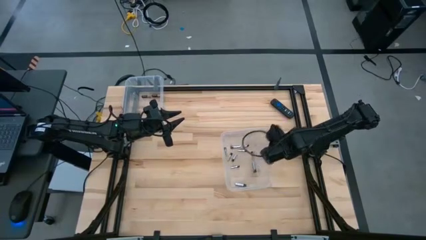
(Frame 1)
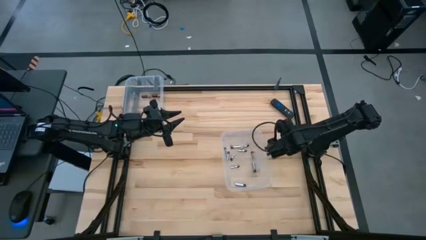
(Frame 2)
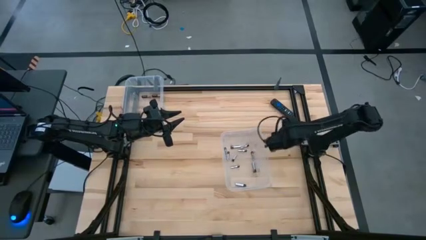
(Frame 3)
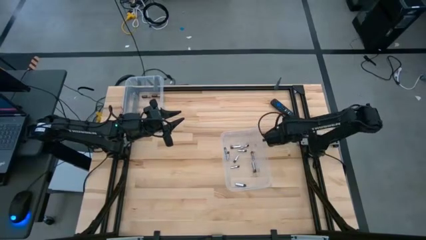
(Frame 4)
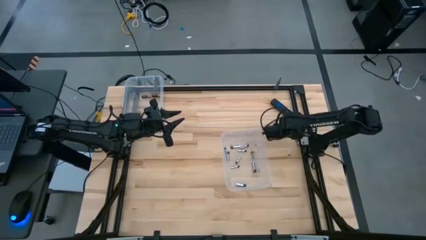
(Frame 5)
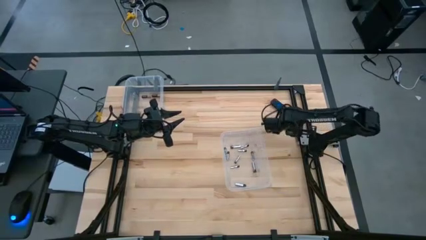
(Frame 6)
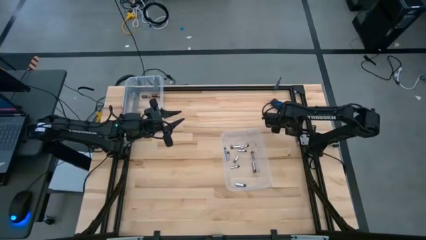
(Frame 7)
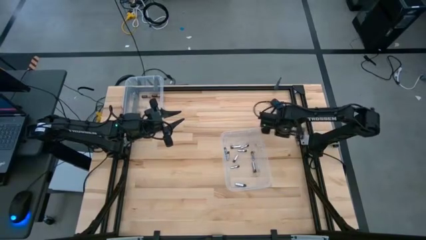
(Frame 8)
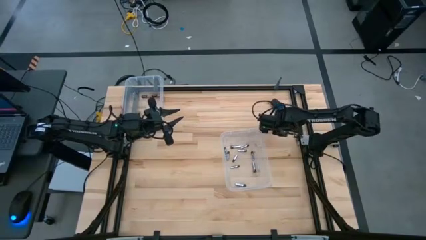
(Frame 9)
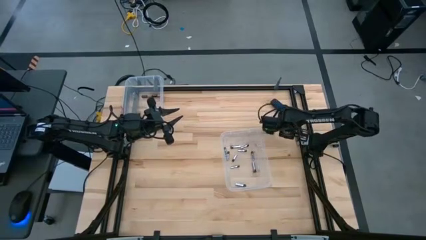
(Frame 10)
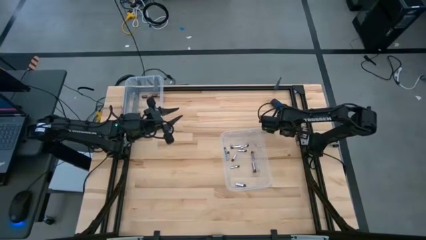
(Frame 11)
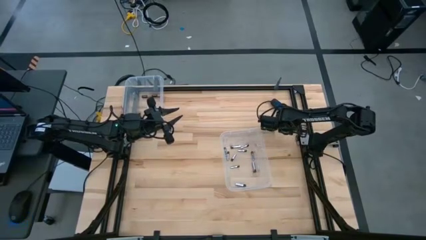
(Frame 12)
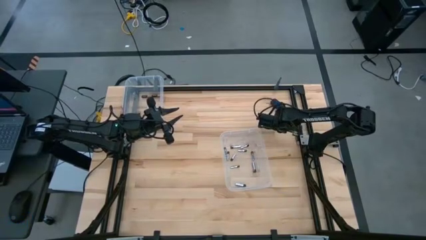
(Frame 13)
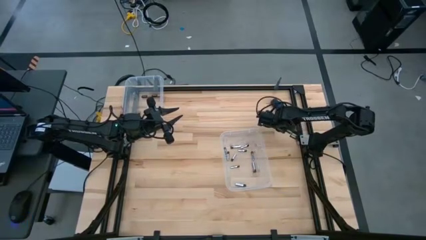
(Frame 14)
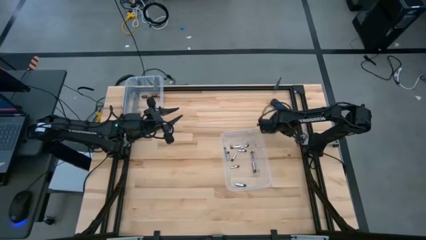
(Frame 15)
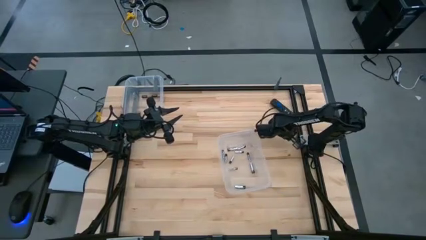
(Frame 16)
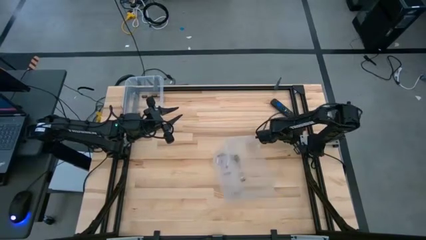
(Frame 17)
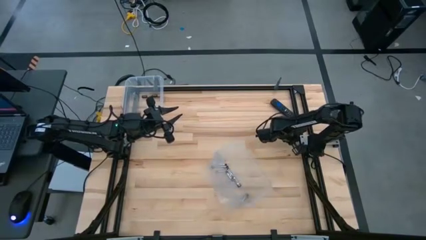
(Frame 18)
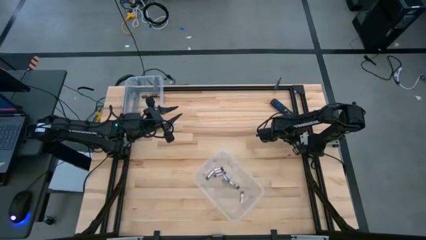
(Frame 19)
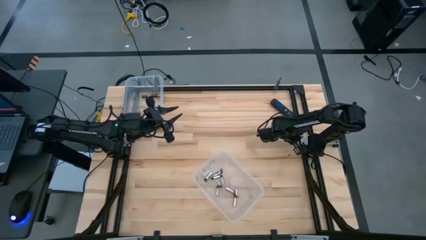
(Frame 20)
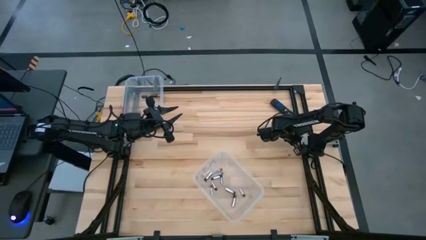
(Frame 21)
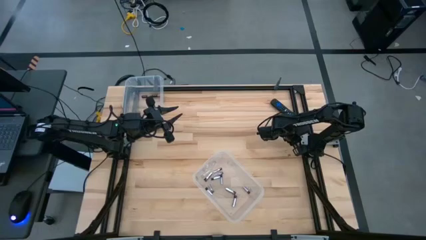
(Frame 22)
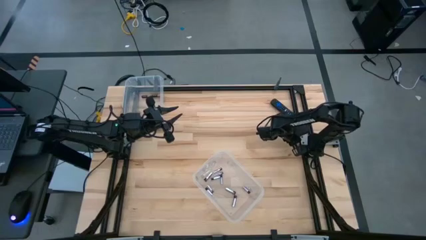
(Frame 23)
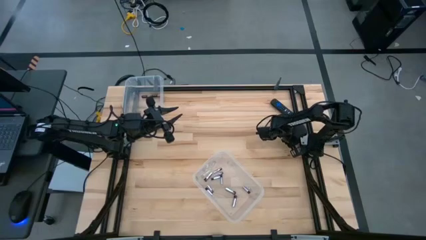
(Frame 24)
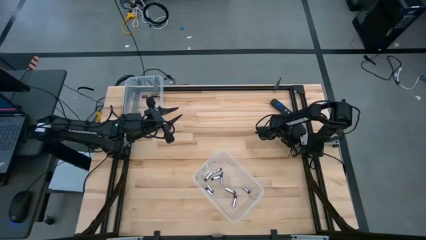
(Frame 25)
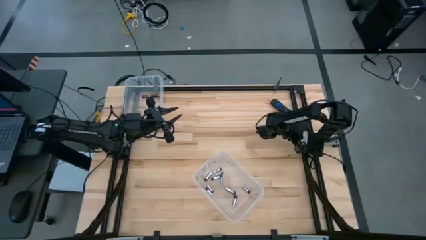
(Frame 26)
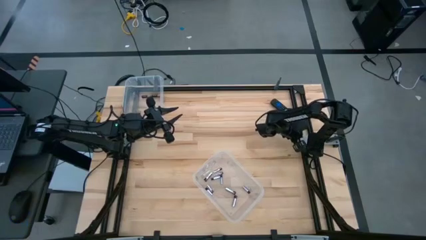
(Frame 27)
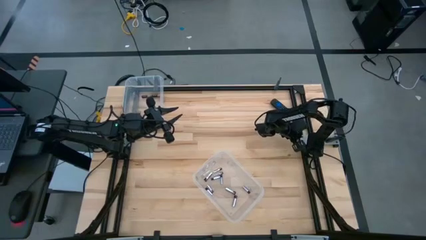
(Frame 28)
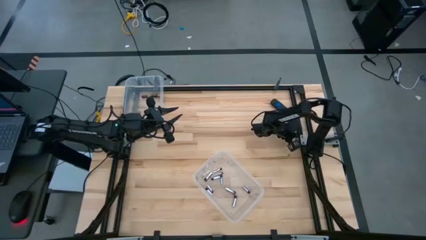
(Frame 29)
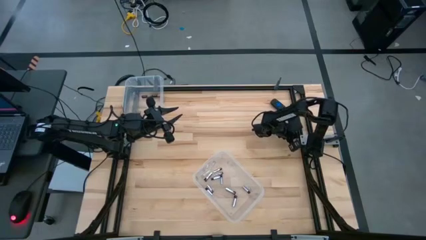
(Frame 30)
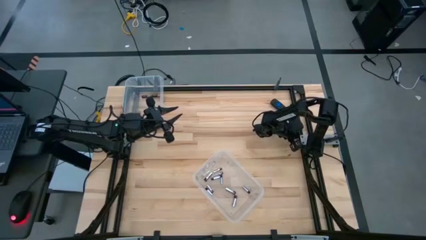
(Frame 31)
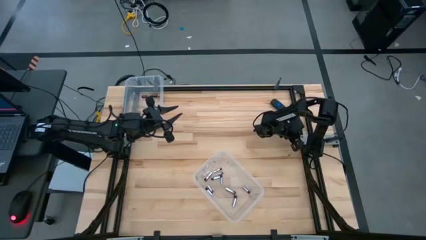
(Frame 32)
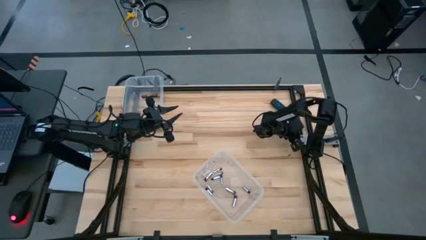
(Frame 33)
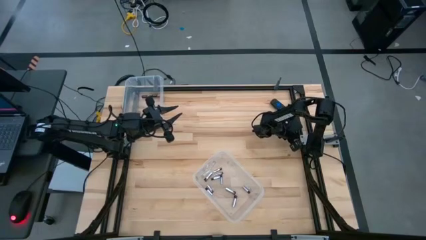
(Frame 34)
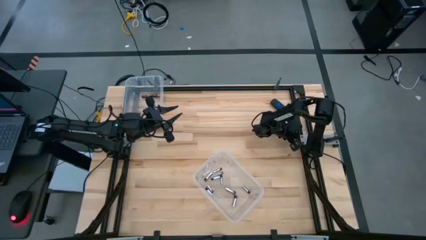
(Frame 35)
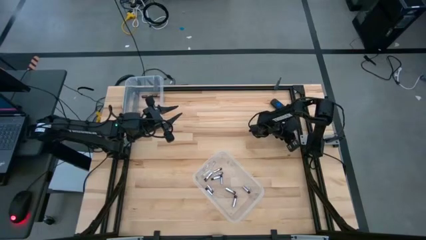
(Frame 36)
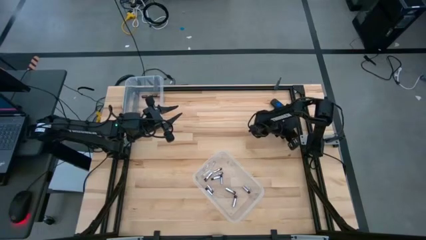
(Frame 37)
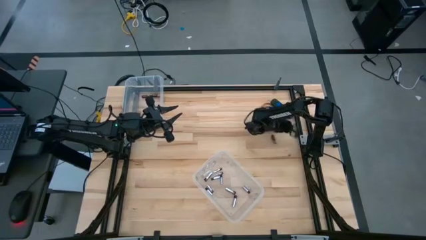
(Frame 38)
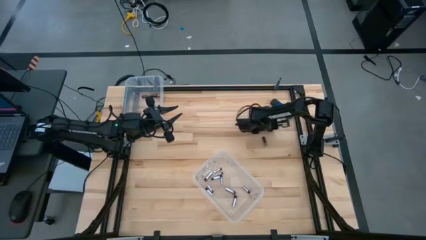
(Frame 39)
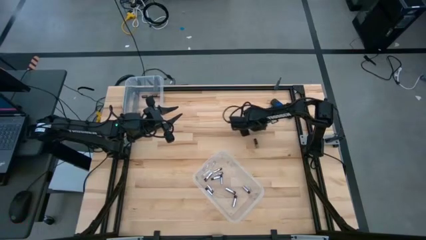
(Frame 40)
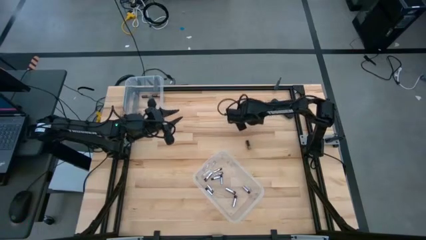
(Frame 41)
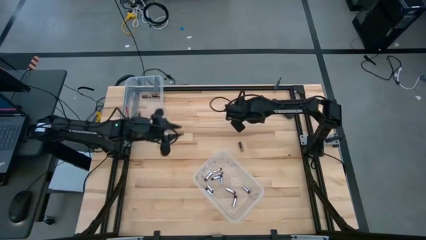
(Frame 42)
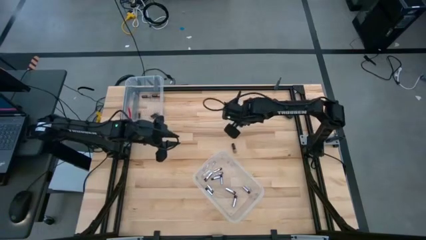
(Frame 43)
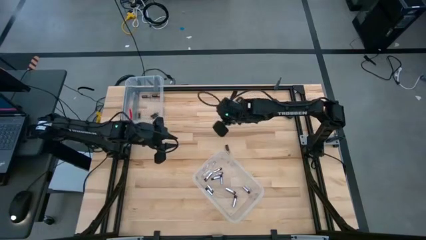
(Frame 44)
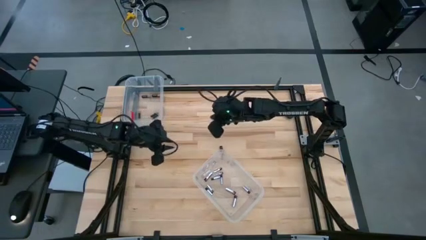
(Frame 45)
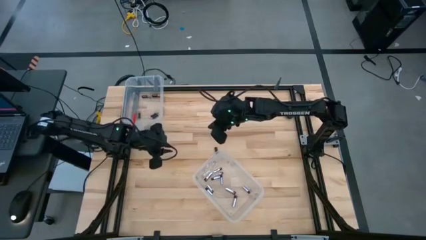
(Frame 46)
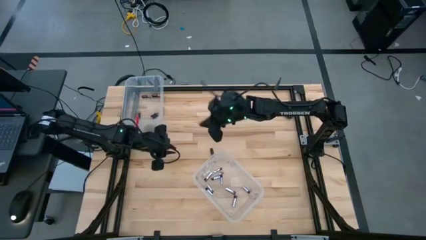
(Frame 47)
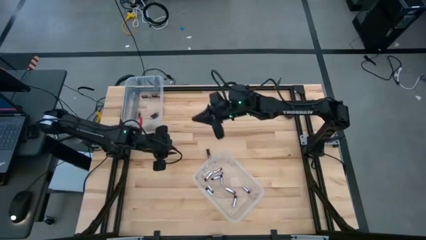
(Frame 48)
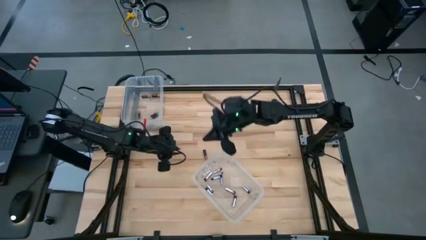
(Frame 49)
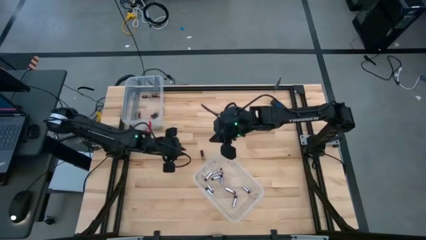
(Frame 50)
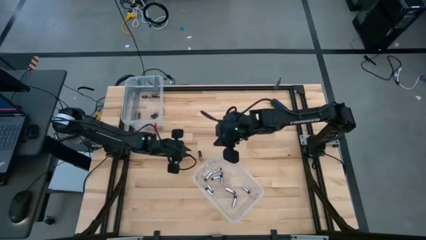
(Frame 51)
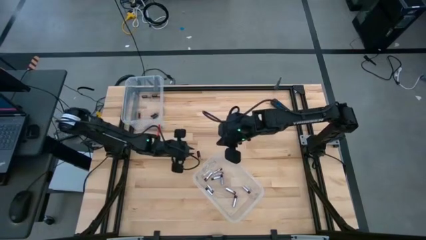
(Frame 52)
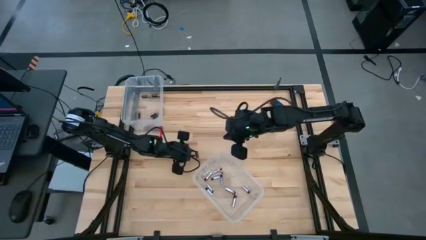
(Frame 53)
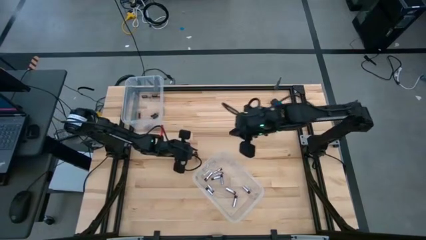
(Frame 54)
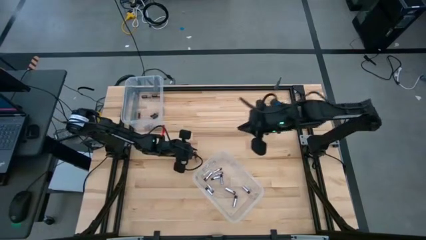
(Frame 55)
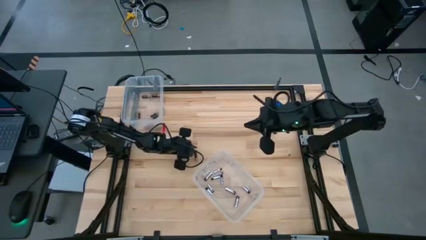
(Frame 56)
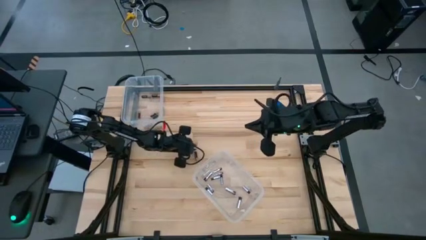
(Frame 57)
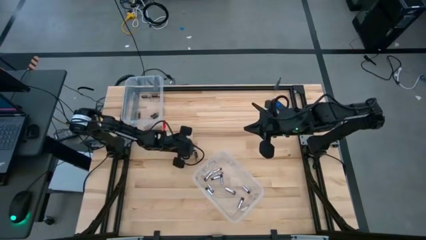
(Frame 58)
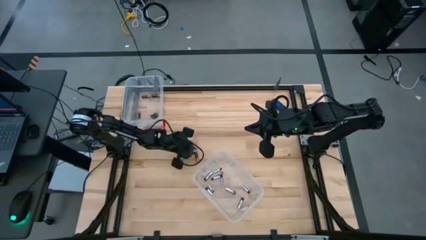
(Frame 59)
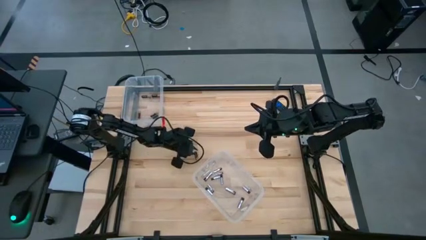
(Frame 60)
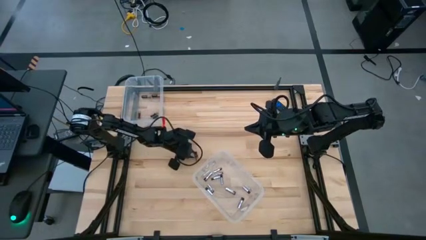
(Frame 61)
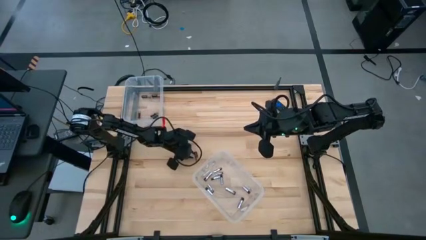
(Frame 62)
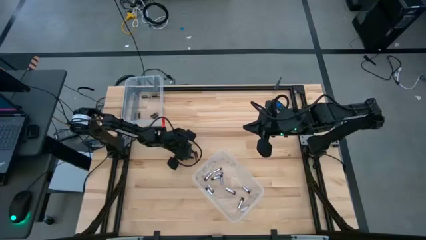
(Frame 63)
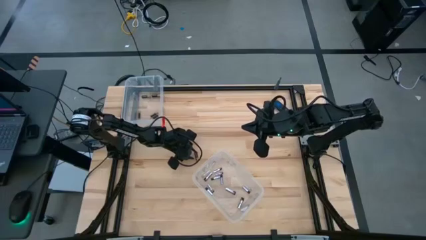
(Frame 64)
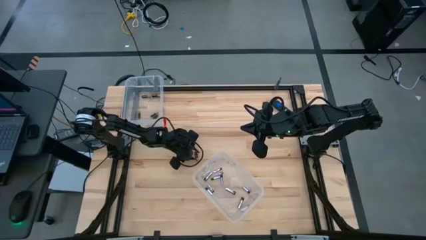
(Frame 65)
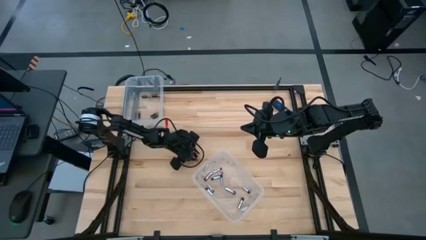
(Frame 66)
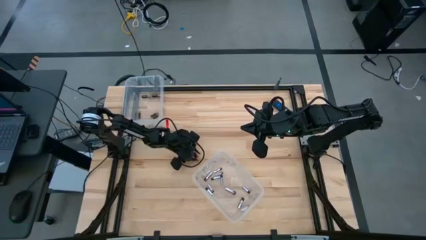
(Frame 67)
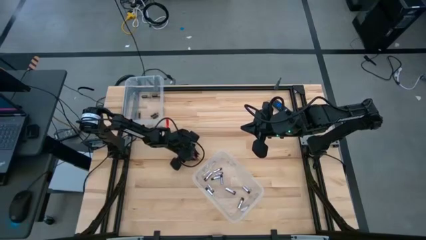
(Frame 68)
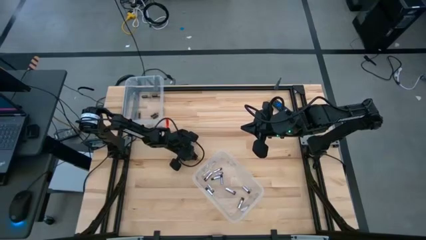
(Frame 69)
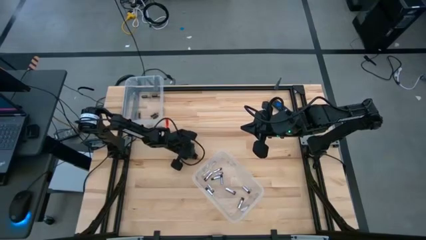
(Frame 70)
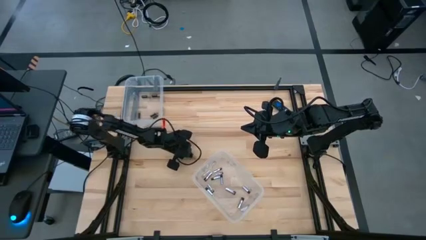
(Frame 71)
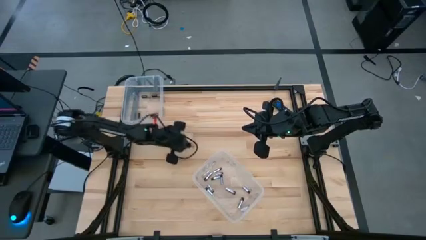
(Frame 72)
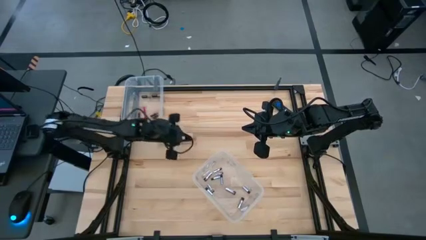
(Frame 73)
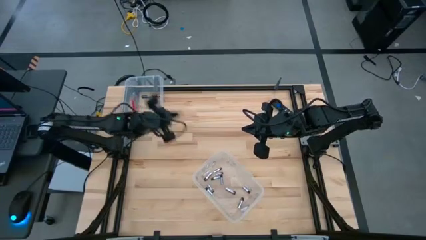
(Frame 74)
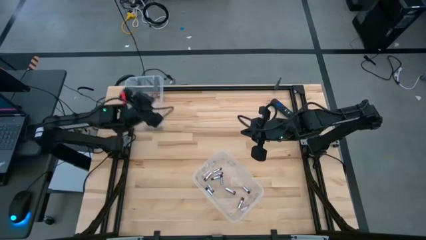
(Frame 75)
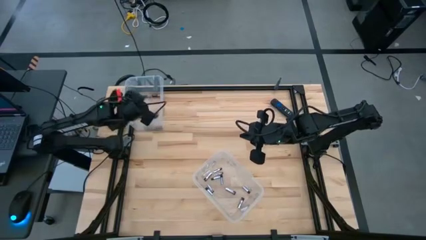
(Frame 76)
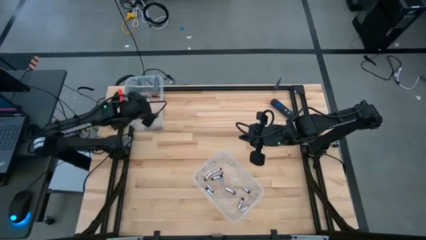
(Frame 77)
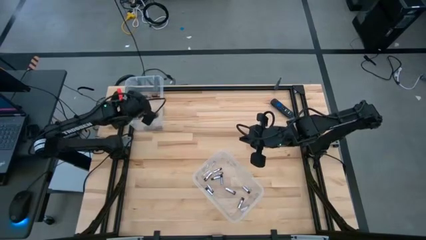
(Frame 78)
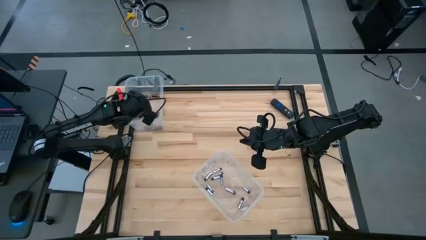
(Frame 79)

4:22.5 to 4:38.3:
Task: Sort batteries
Put the black and copper battery into the top transparent bin
